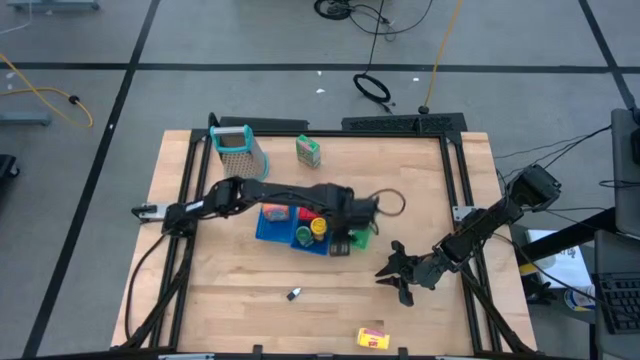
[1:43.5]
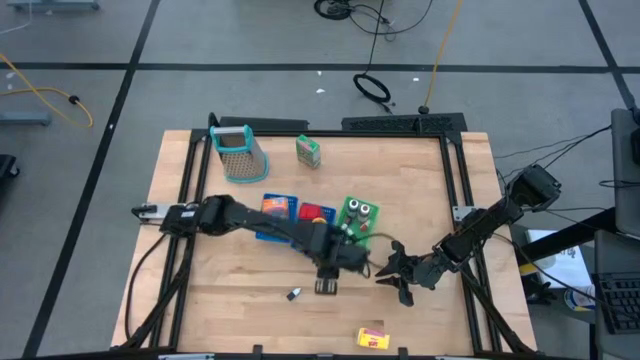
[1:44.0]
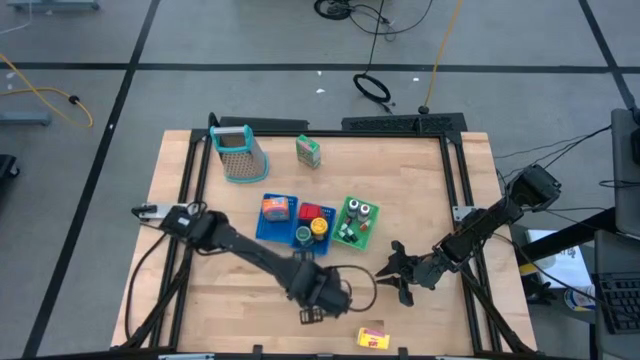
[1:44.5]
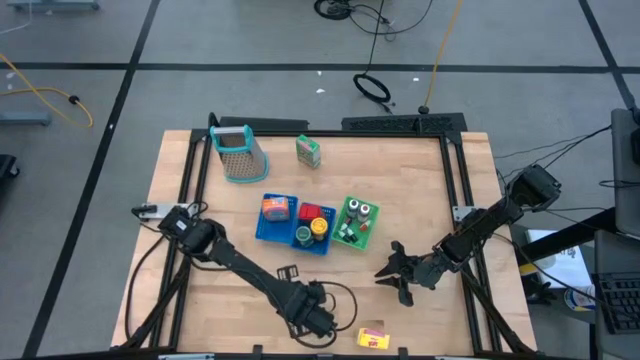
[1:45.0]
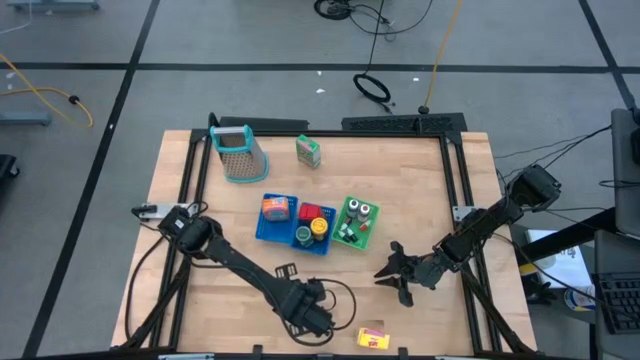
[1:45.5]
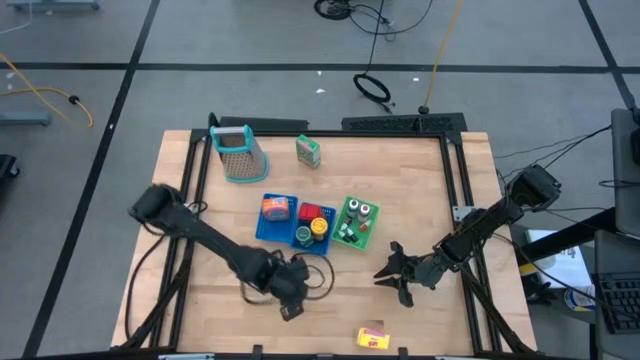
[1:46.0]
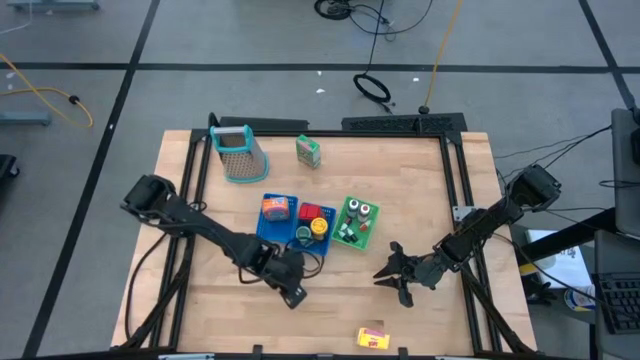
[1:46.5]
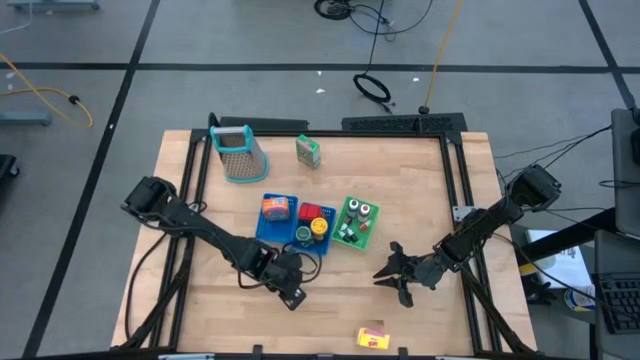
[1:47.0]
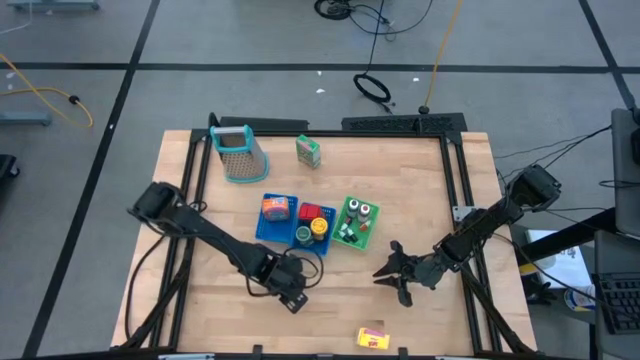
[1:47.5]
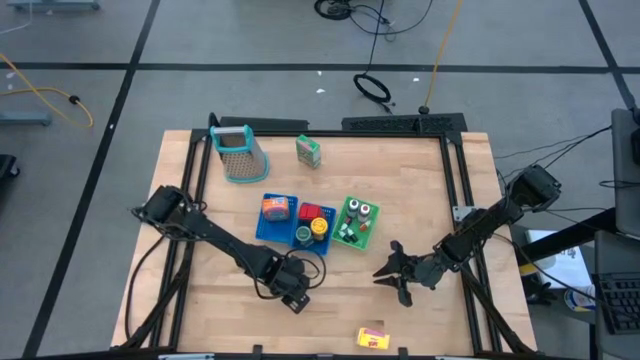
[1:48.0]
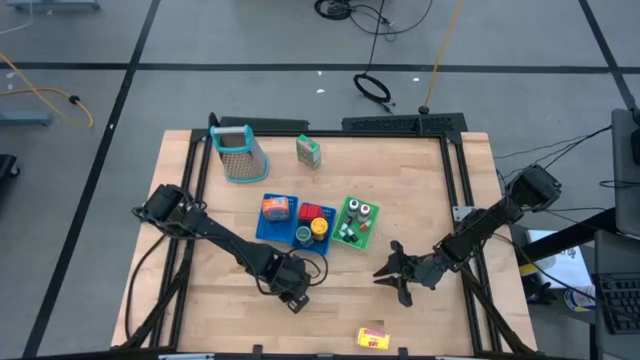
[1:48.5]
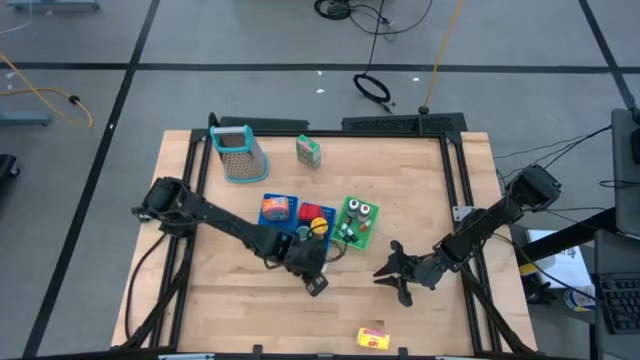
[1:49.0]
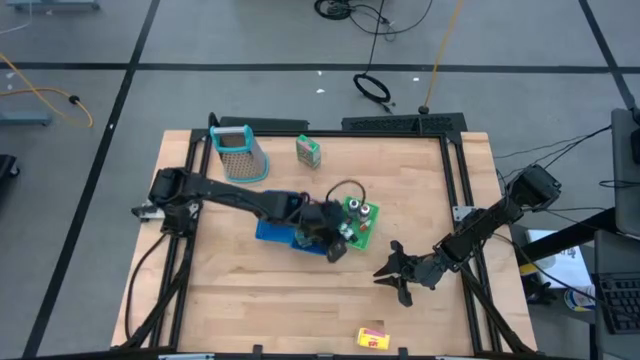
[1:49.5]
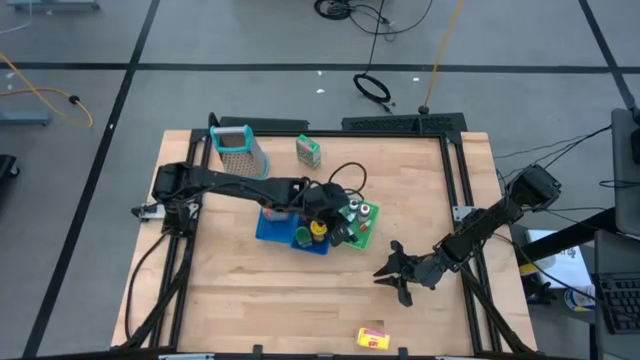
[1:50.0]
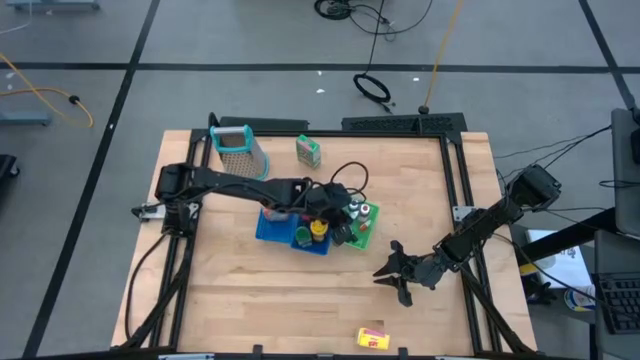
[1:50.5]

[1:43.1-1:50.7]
Task: Pick & Place Kitchen Items
Put the small purple food color into the green bin

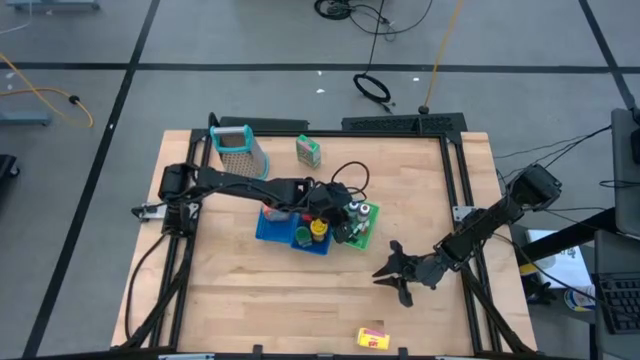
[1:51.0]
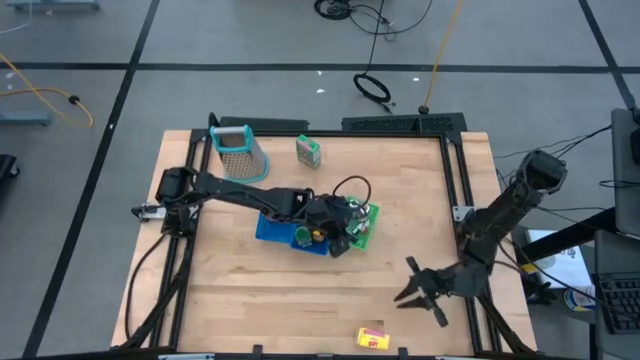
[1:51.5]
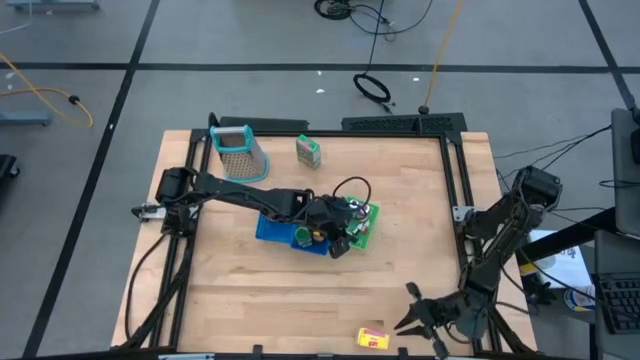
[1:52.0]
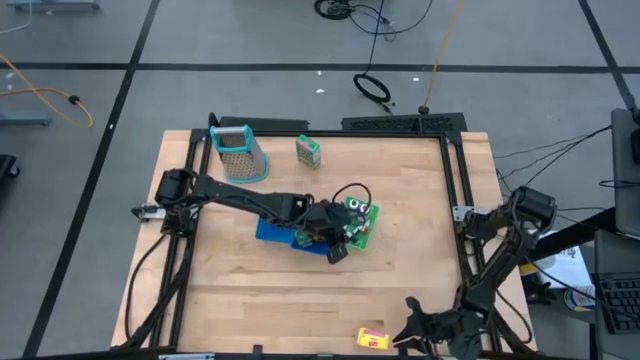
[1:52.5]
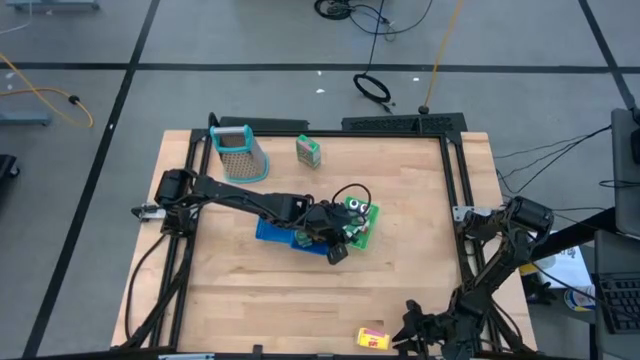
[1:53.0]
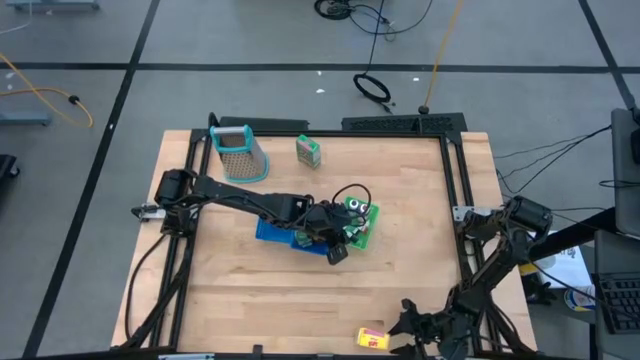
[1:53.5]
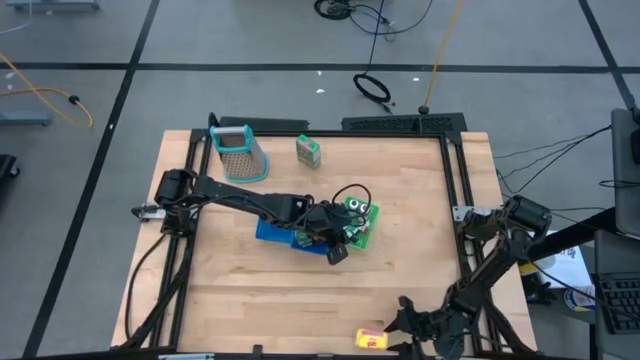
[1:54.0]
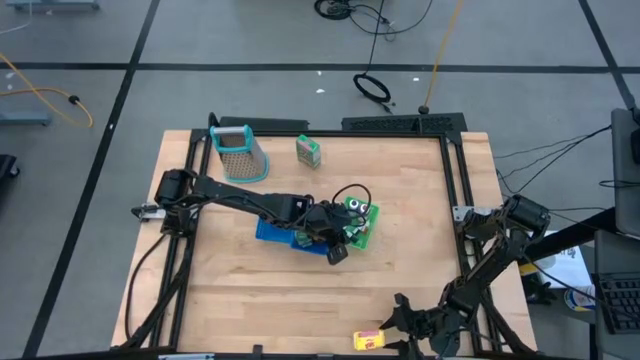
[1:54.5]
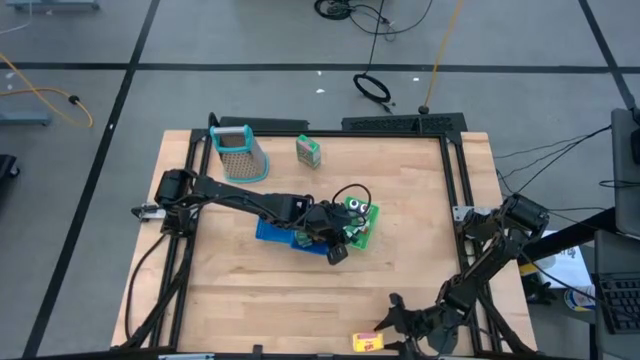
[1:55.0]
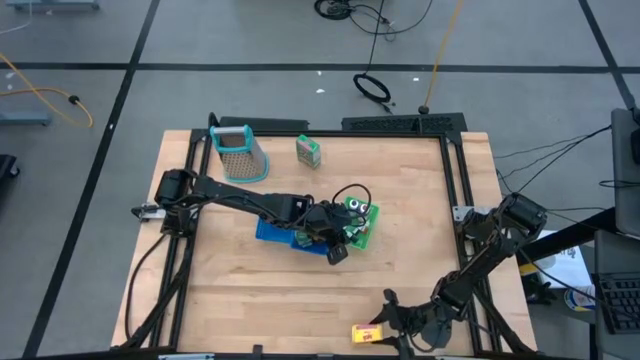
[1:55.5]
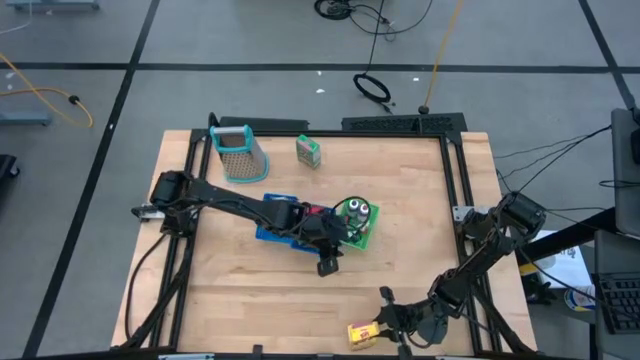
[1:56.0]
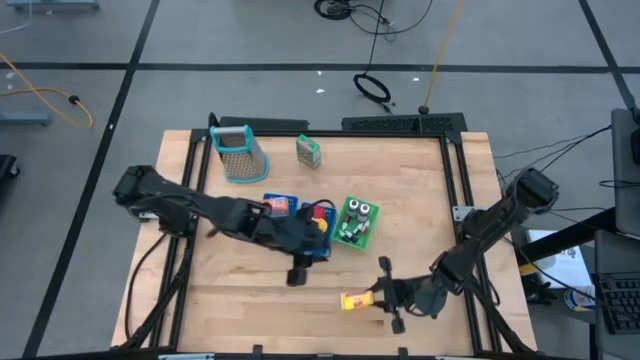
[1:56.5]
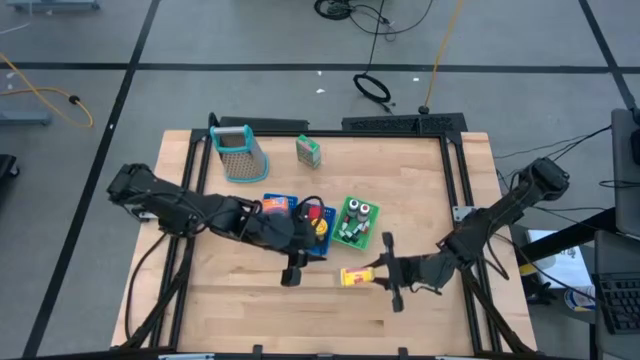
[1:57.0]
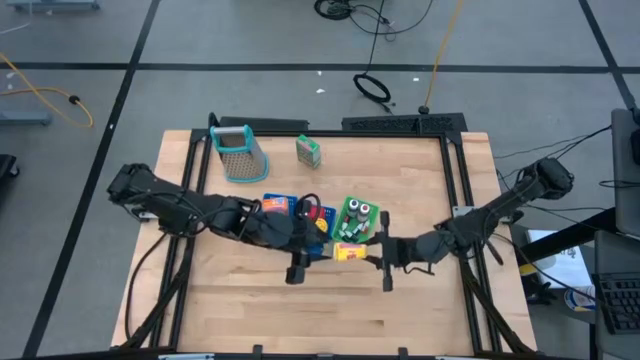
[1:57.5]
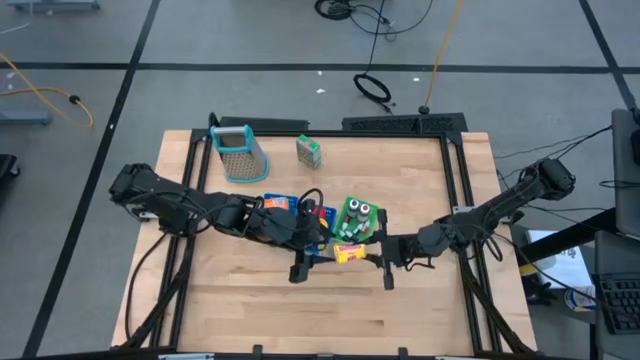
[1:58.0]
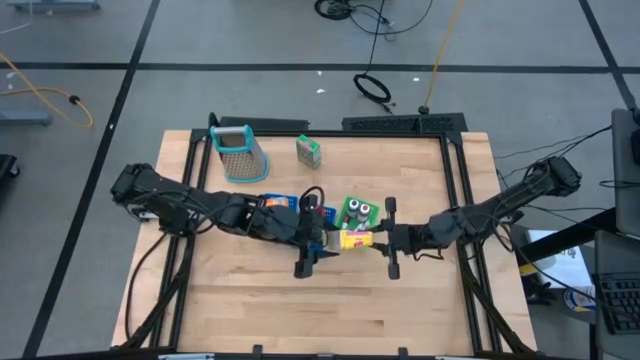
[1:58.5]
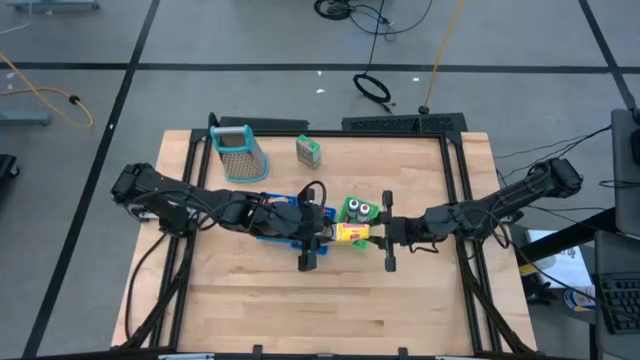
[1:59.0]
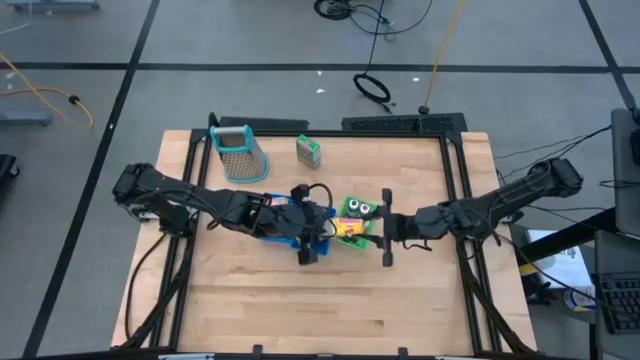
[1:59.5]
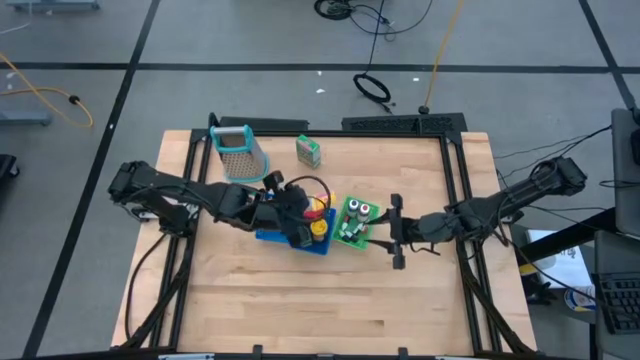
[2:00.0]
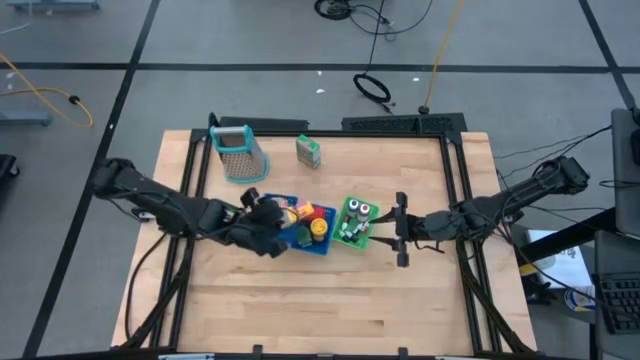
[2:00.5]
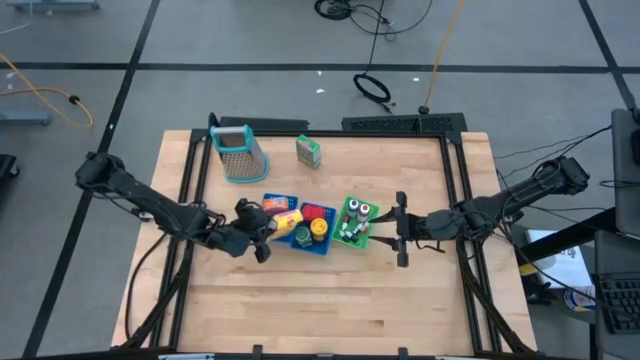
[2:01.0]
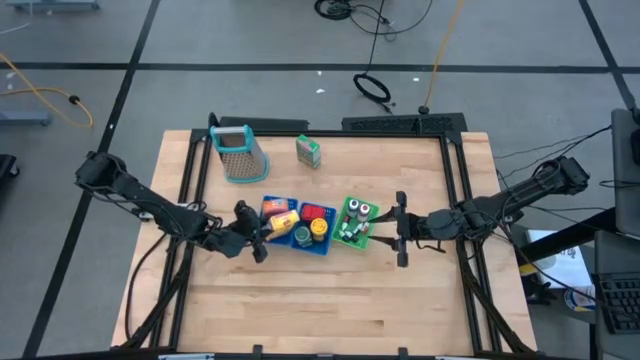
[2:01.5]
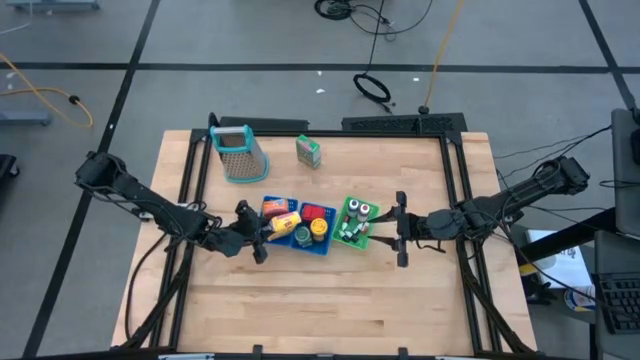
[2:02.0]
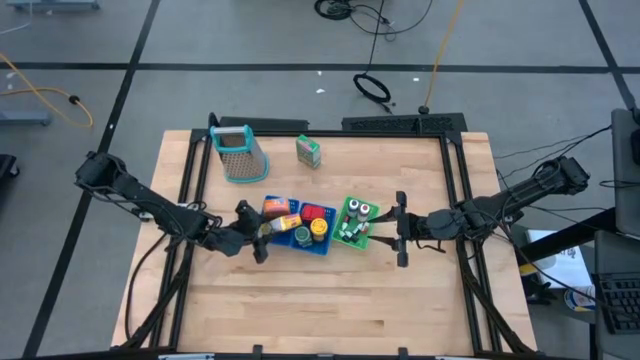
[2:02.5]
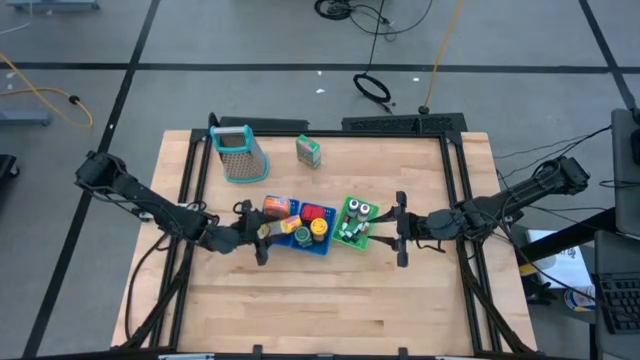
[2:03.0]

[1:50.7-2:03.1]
Put the yellow cereal box into the left blue bin
